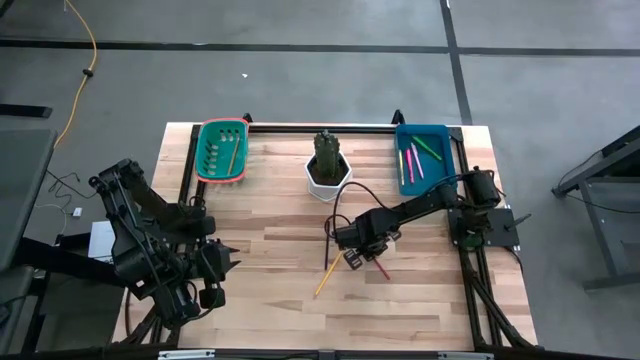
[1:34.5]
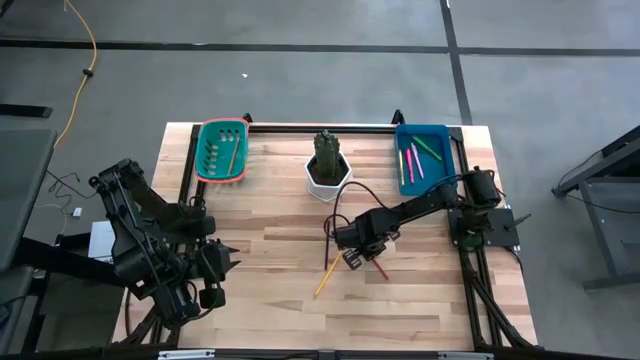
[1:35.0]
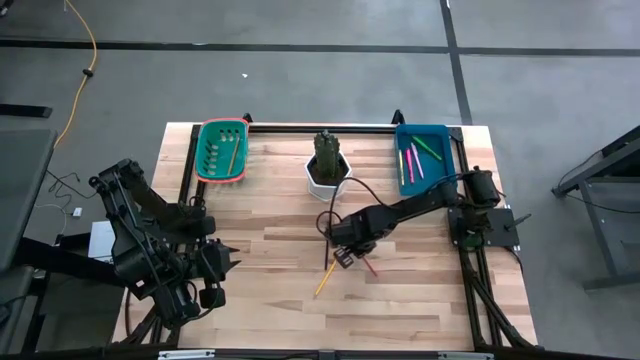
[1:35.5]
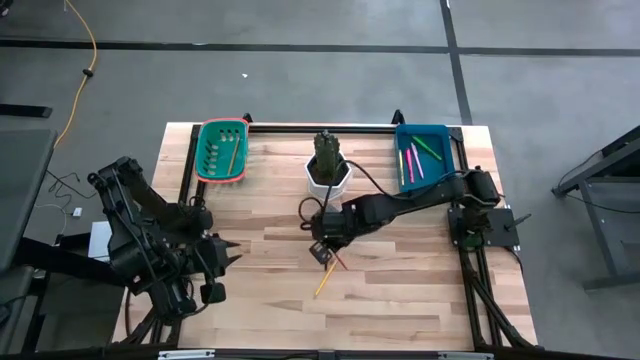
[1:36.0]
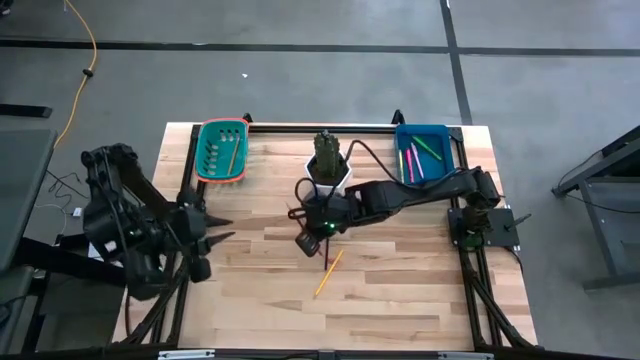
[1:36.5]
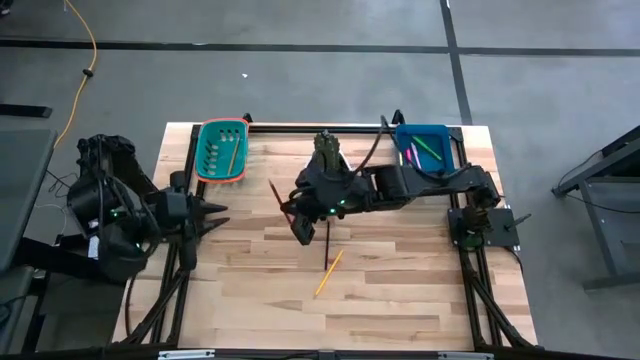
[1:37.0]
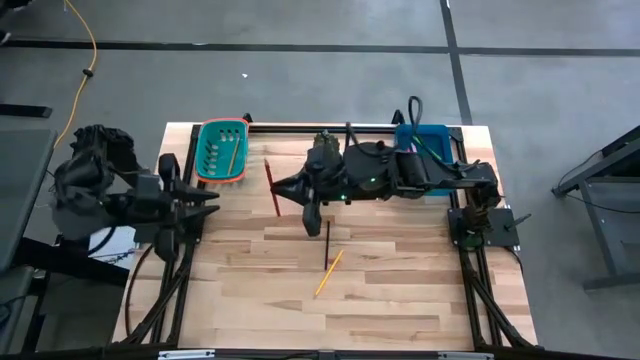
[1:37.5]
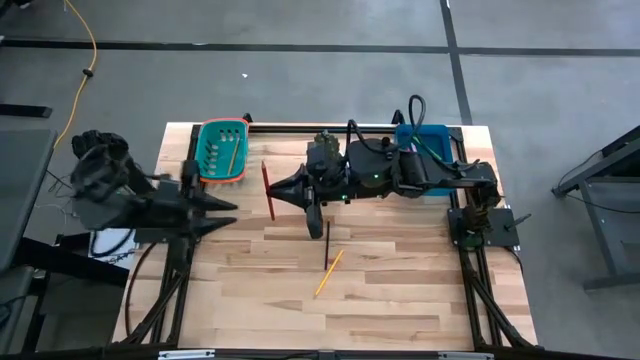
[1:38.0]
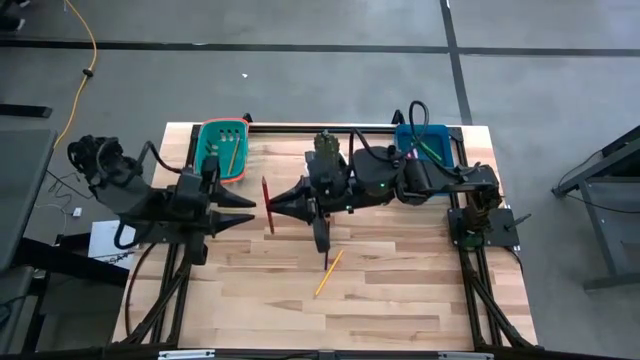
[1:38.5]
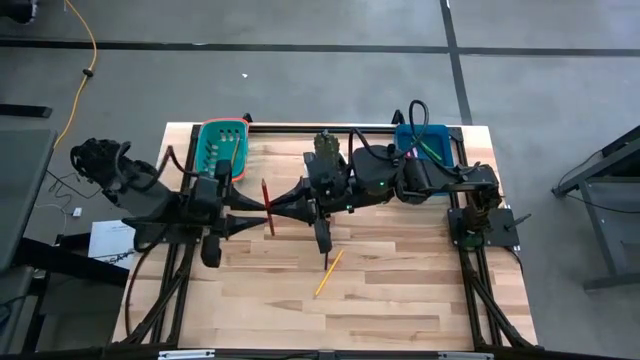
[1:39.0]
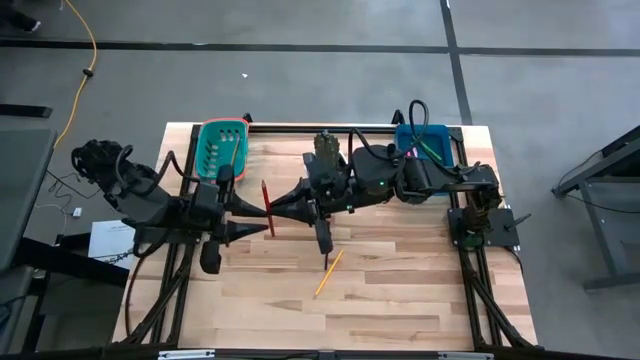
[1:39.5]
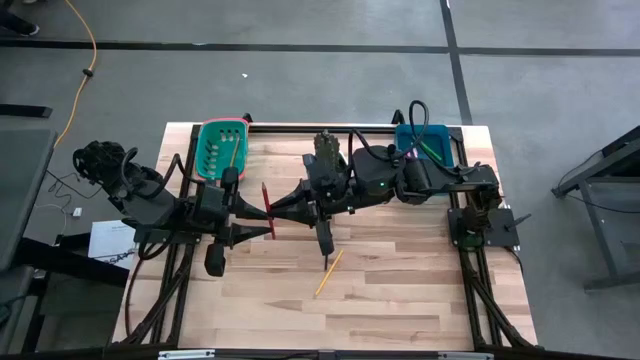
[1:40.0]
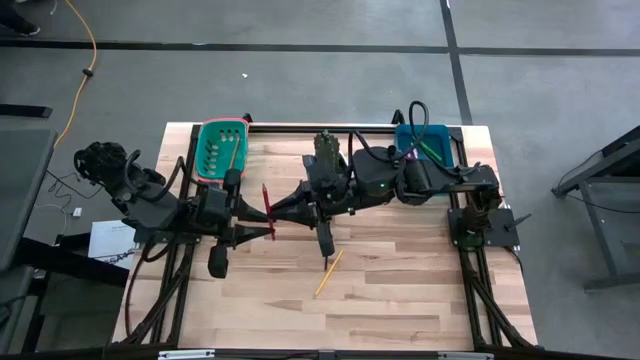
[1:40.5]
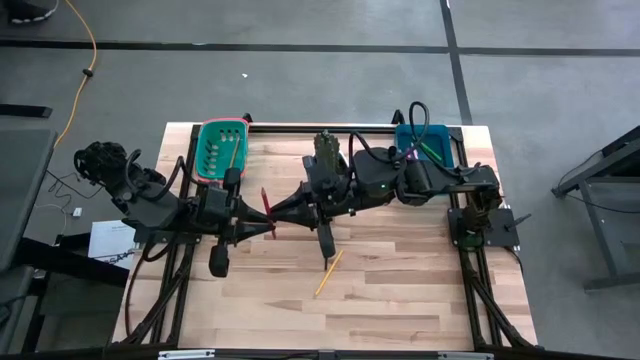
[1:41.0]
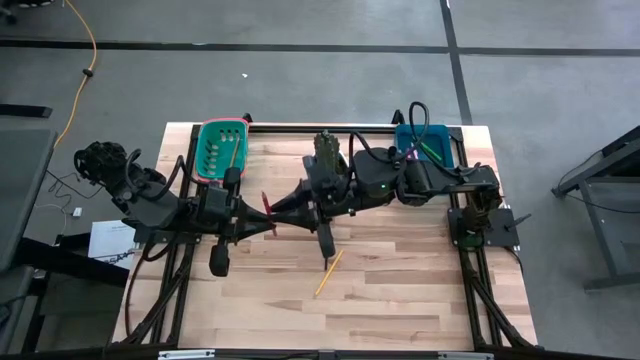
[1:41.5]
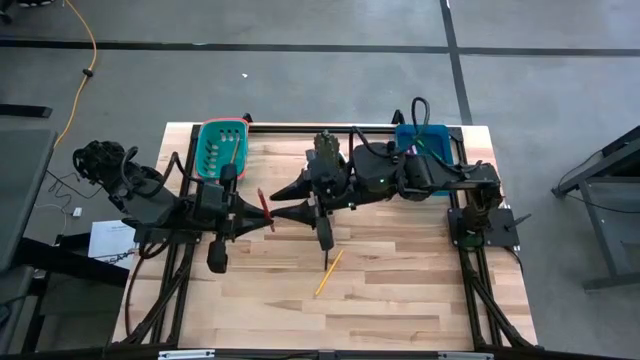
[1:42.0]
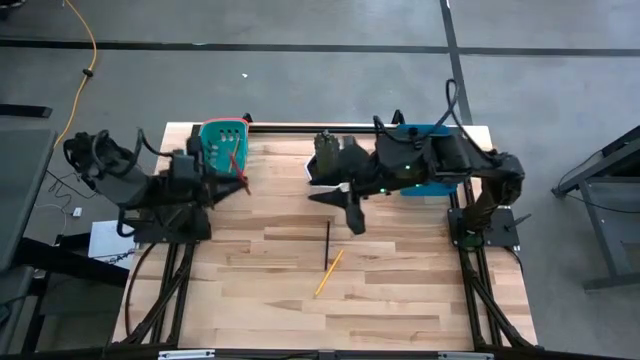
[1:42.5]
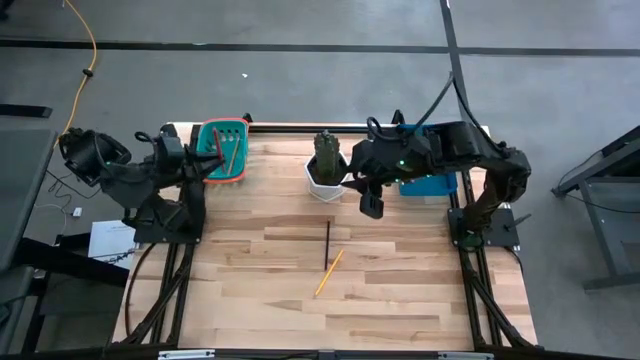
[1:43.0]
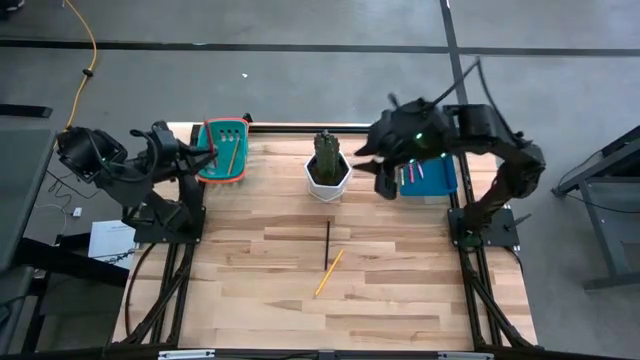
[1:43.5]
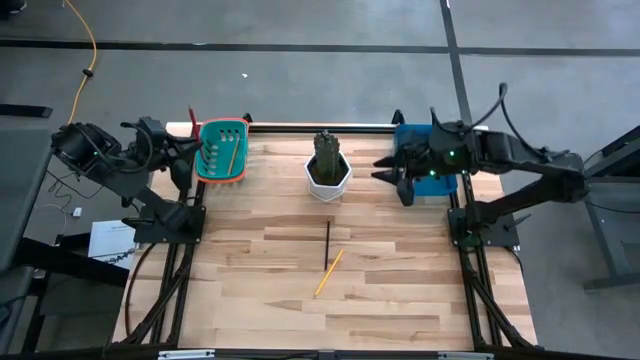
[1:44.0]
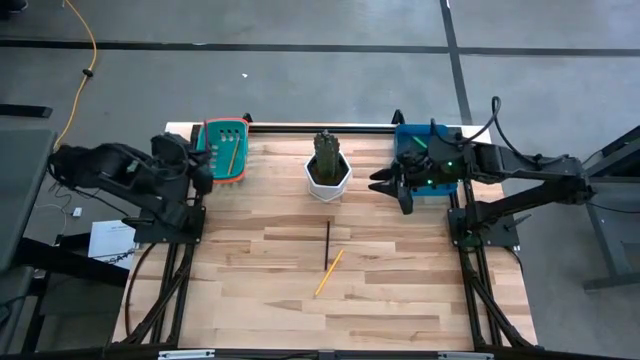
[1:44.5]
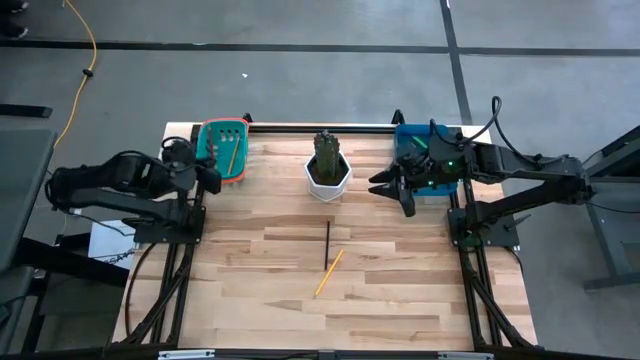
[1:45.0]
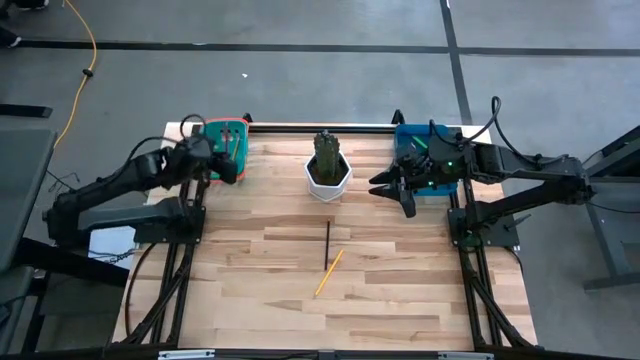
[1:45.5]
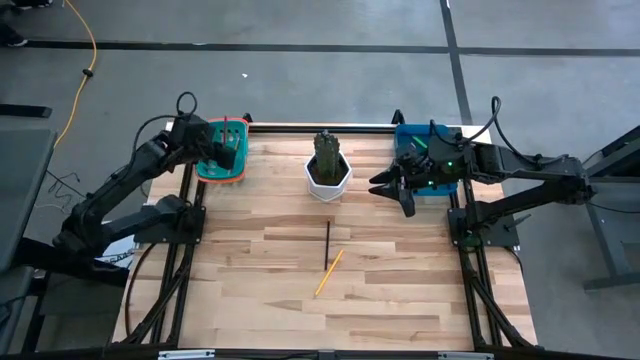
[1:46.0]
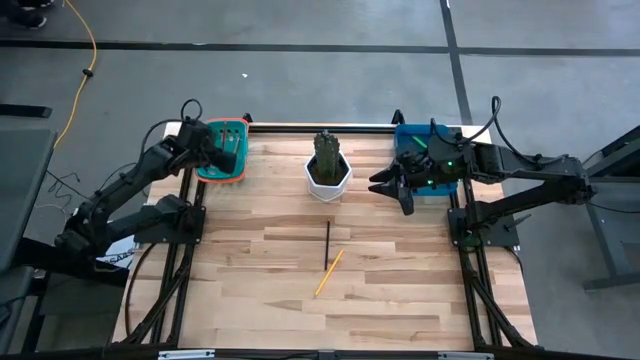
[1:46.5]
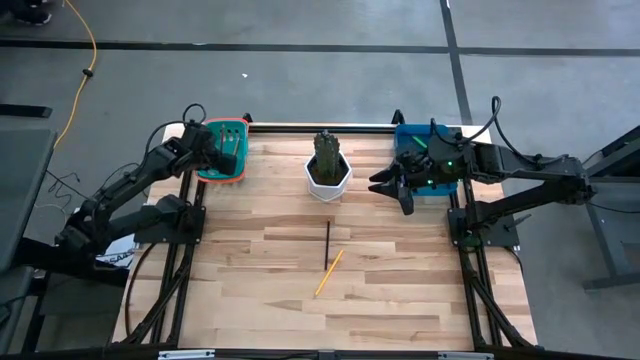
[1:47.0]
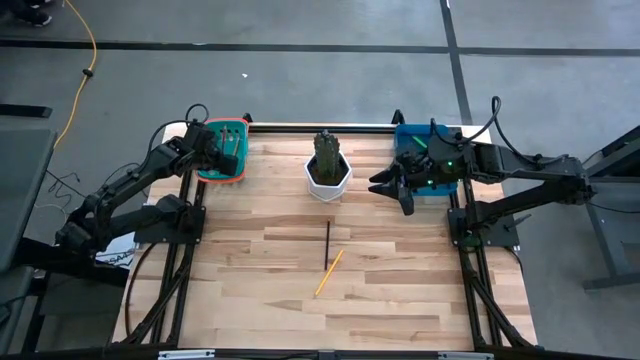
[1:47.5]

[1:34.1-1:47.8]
Task: Sort pens & pencils
Put the red pencil into the green bin

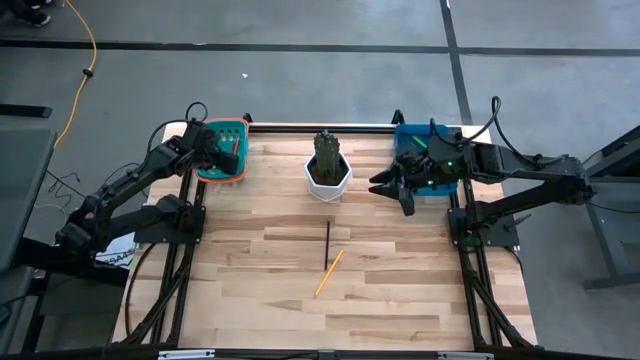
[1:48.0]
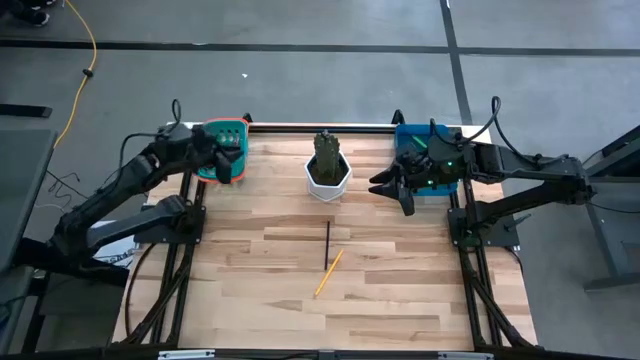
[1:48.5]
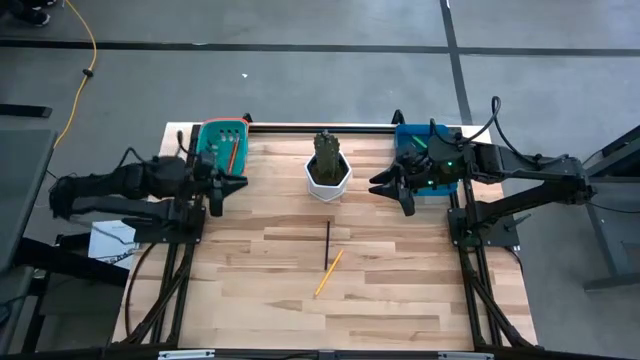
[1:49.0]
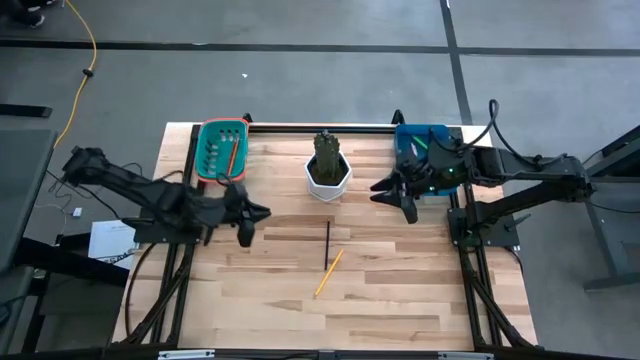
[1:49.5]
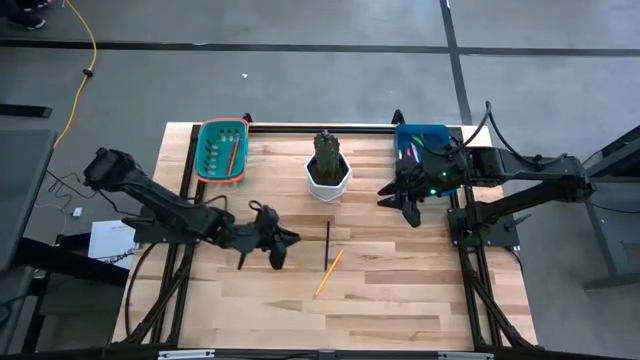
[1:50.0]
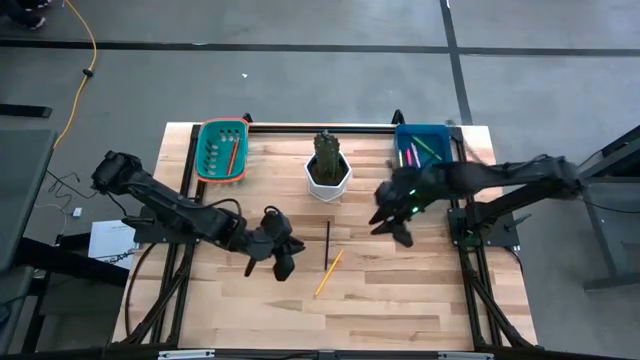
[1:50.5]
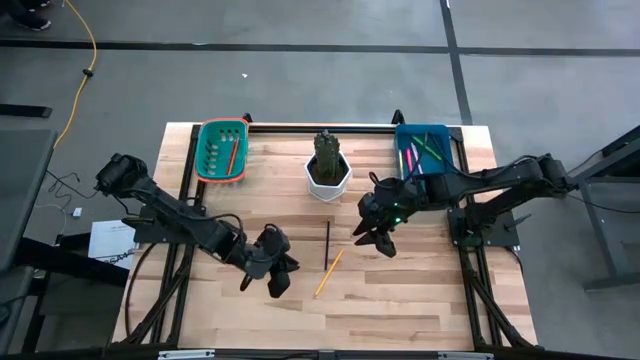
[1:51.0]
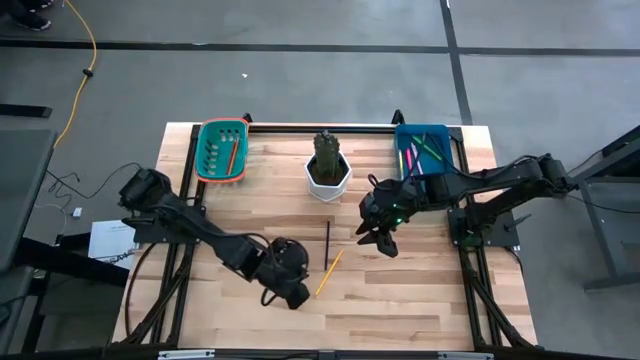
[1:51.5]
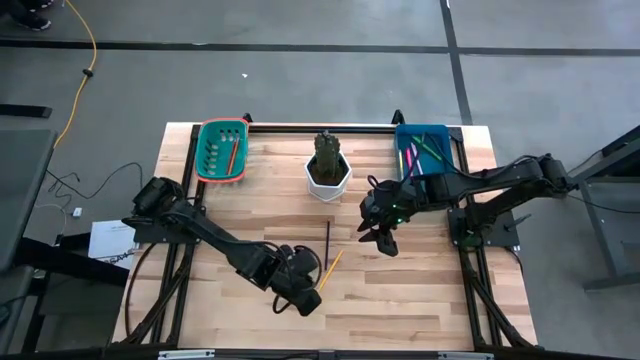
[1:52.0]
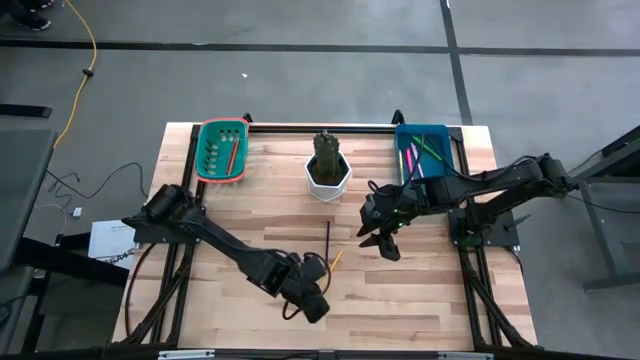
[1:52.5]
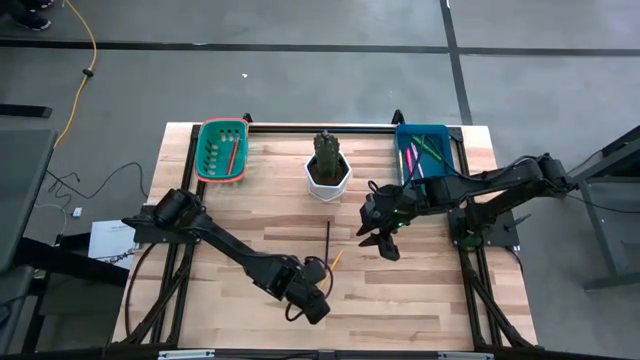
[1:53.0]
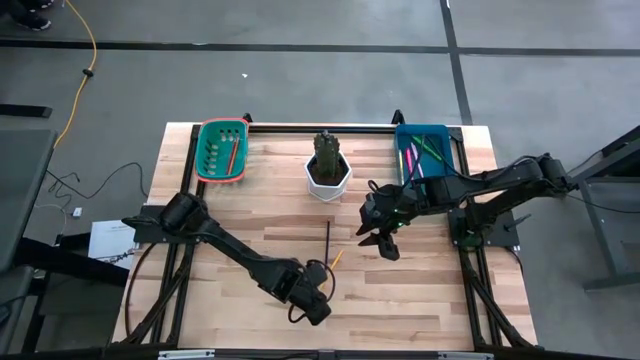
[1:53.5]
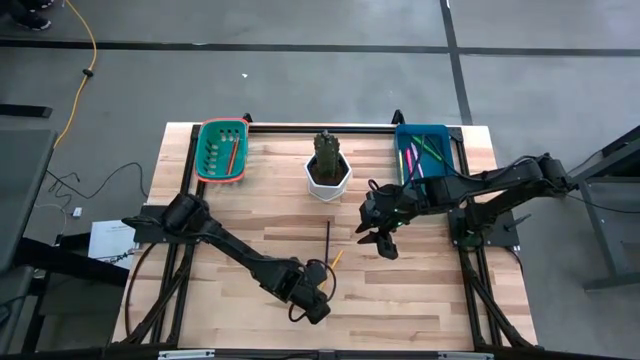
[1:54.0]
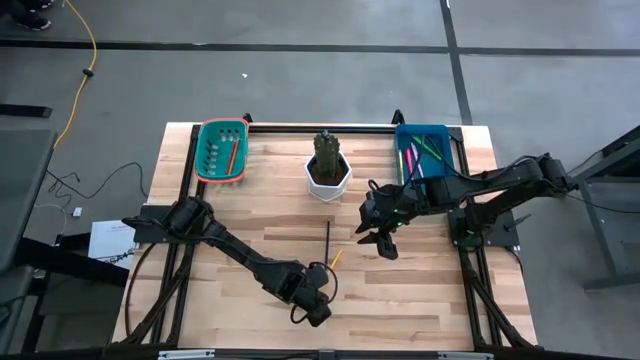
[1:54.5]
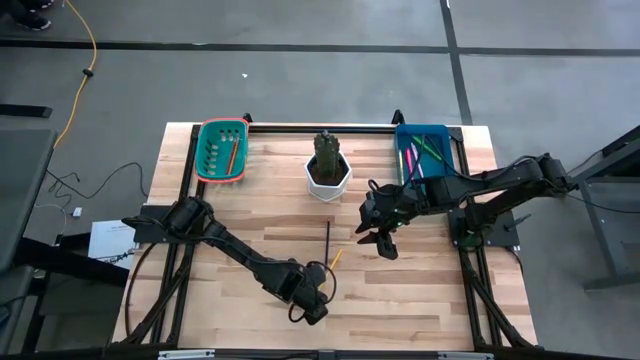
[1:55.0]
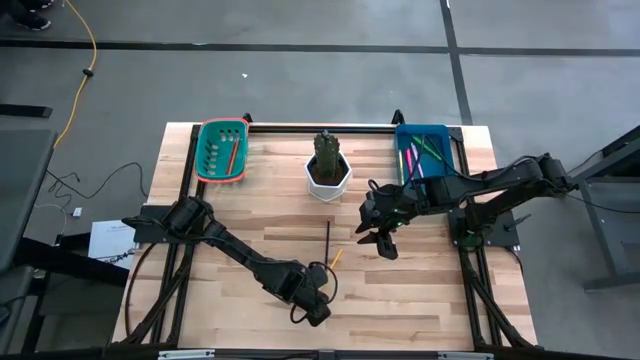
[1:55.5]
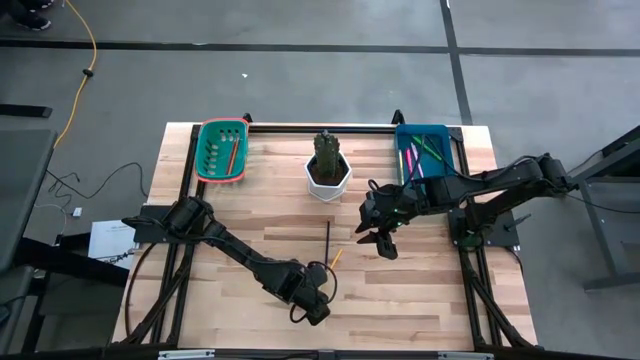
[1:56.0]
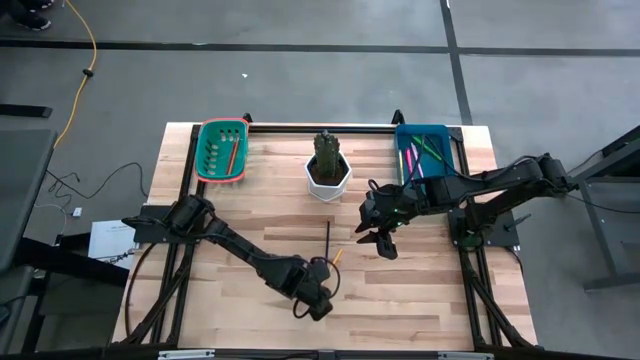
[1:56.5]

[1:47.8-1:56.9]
Put the yellow pencil into the green bin
